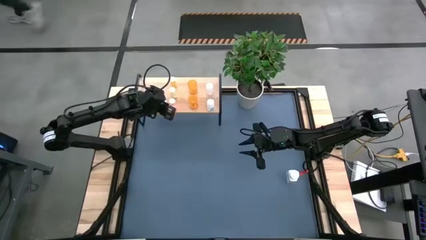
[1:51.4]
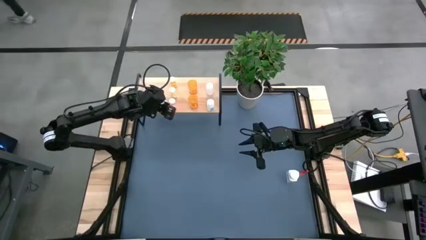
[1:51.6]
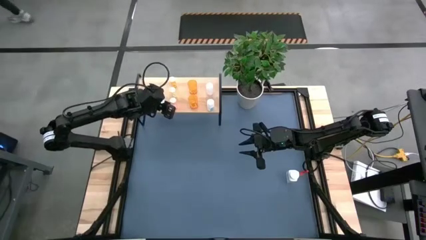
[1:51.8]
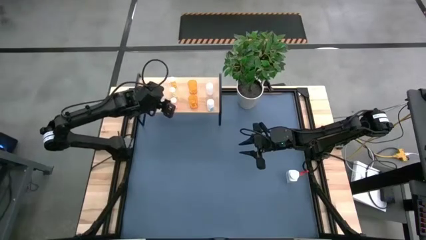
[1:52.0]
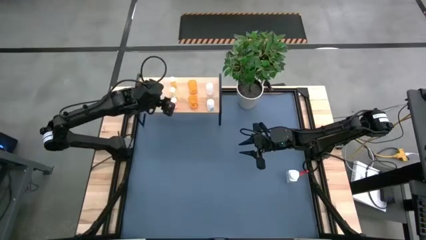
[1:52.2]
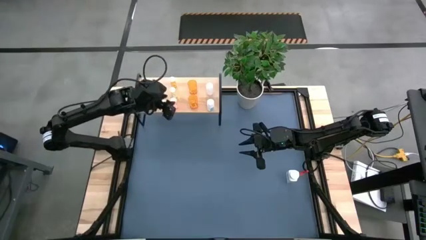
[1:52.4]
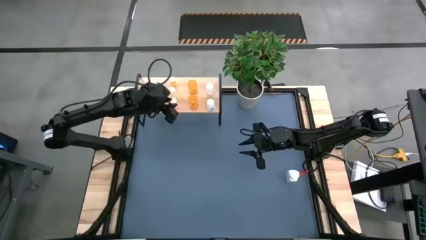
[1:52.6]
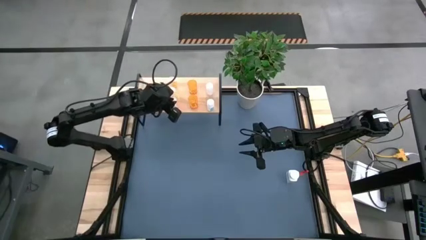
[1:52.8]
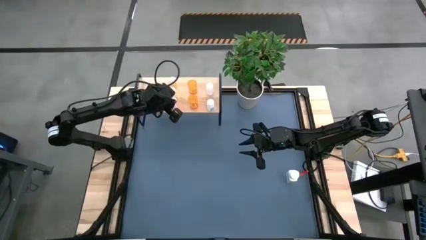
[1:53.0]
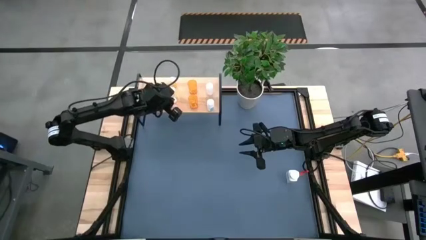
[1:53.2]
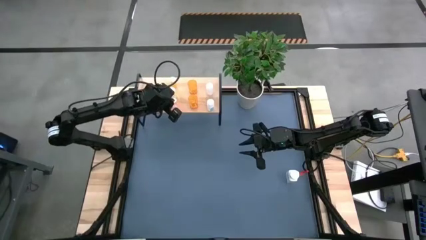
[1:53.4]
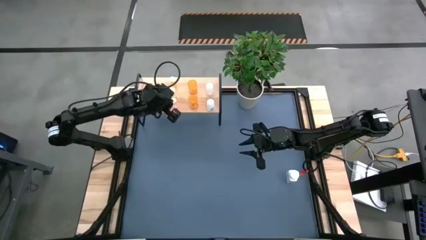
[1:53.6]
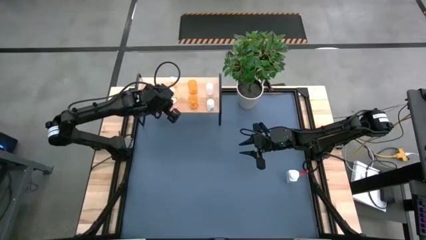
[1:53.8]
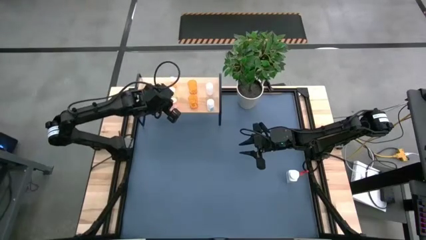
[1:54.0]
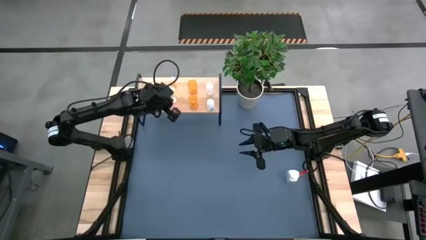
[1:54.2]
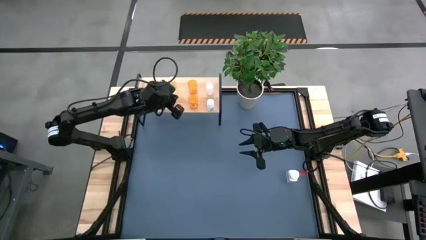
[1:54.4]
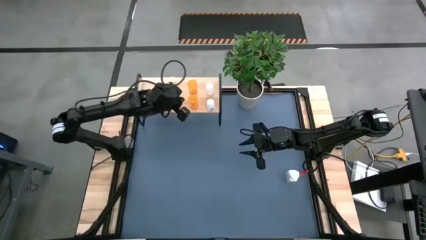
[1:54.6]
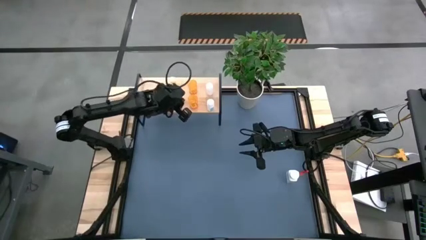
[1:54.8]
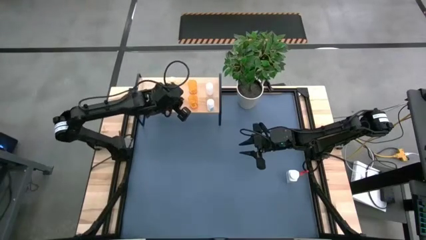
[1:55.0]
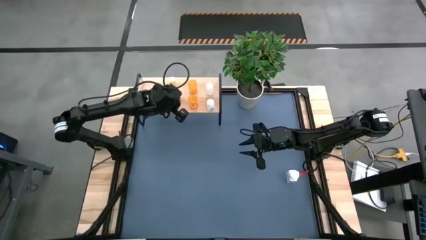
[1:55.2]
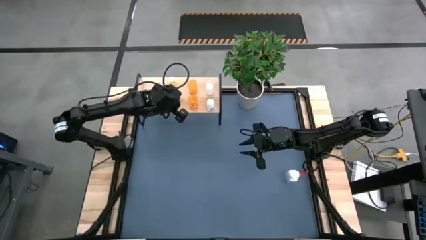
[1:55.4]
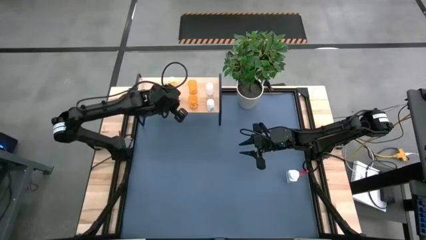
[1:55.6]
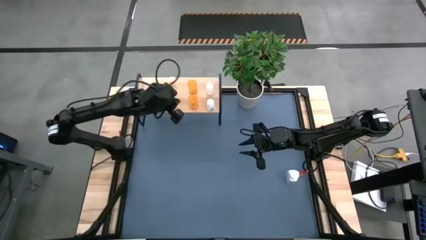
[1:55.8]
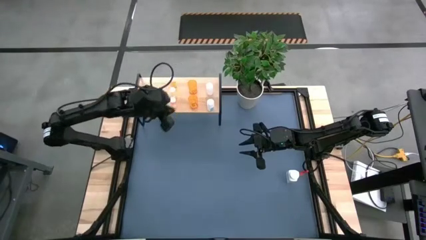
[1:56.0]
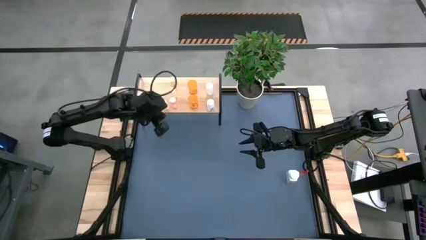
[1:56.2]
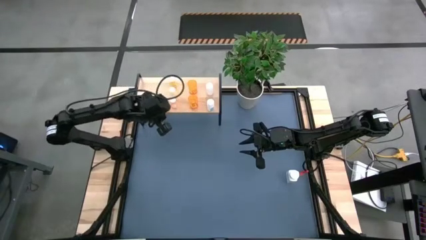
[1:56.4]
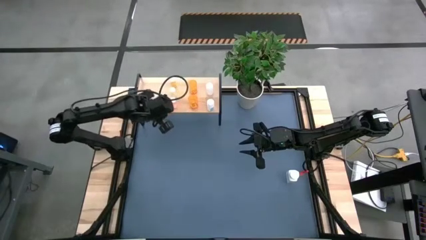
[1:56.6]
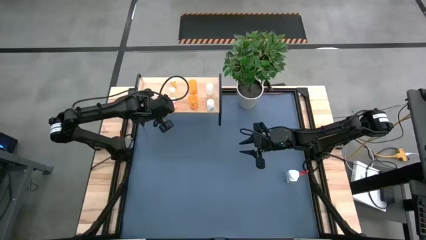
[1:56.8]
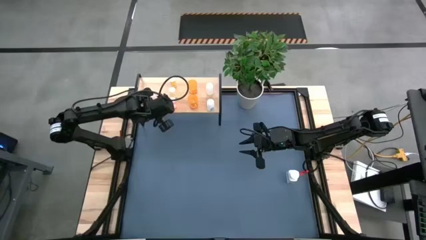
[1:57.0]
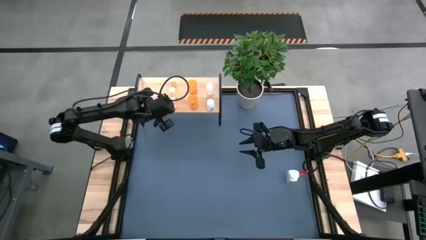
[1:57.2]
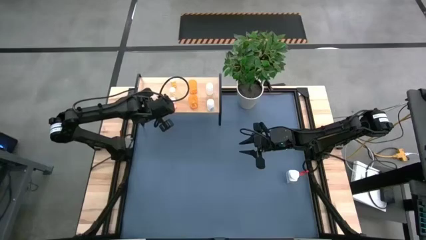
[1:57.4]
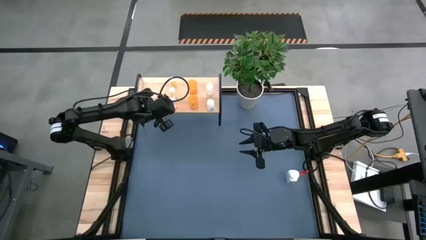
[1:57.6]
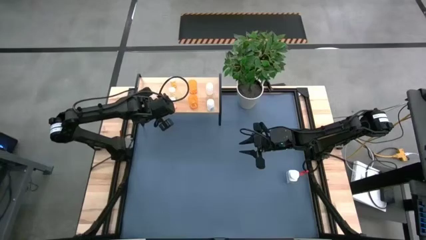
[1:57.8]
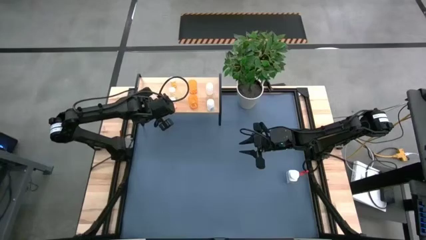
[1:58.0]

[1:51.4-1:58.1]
Task: Pick and place medicine bottles onto shelf by color
Adjust the pill bottles on the shelf

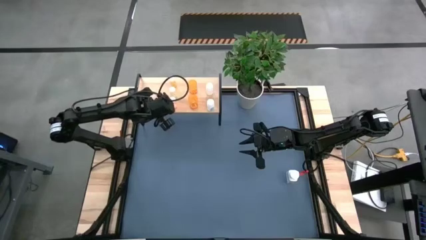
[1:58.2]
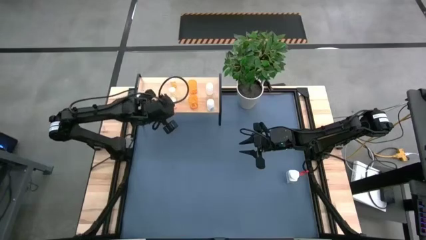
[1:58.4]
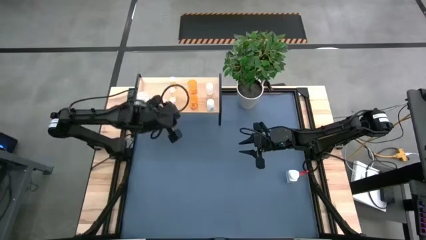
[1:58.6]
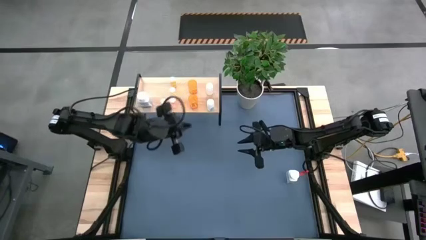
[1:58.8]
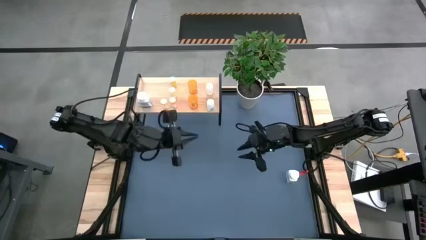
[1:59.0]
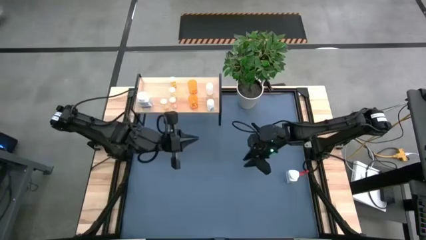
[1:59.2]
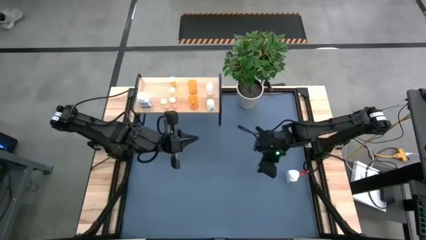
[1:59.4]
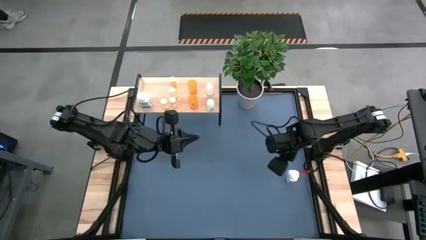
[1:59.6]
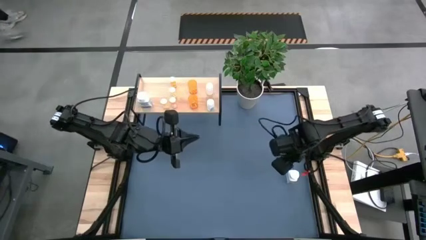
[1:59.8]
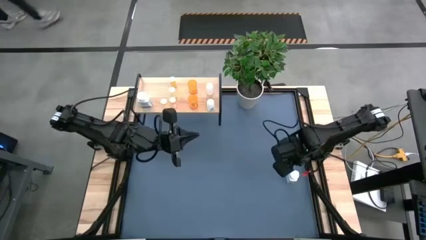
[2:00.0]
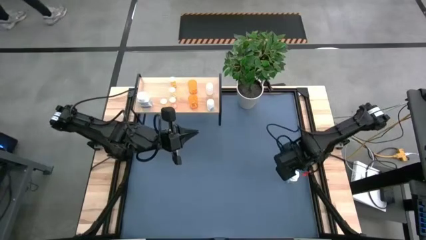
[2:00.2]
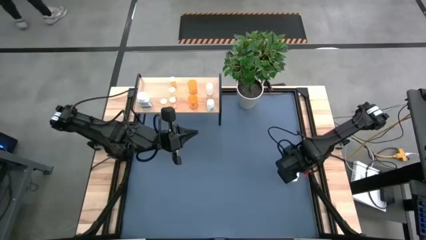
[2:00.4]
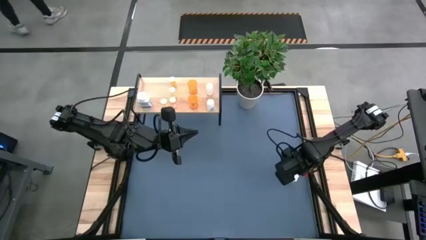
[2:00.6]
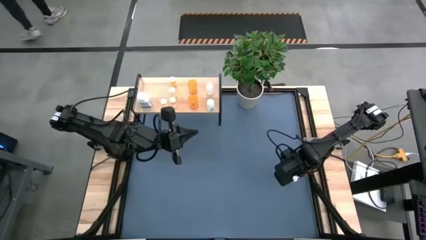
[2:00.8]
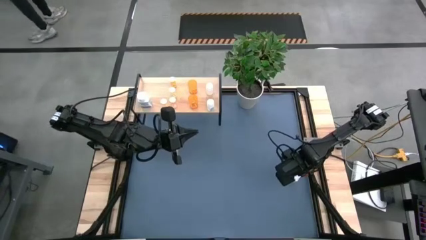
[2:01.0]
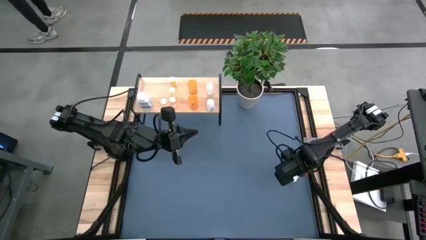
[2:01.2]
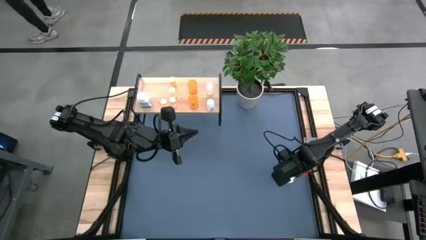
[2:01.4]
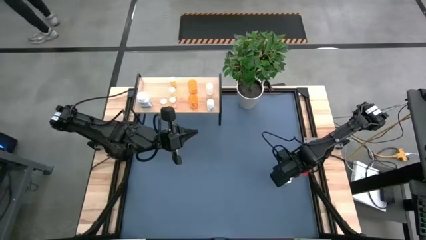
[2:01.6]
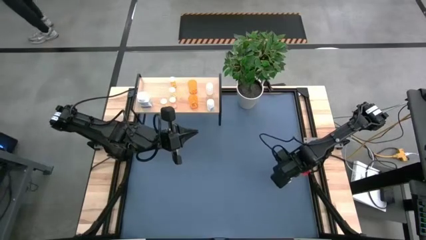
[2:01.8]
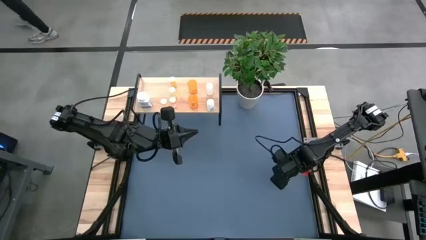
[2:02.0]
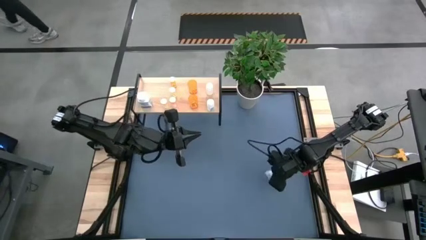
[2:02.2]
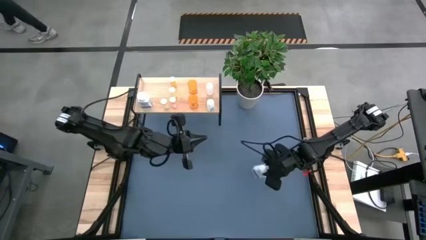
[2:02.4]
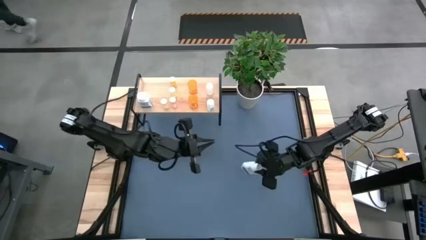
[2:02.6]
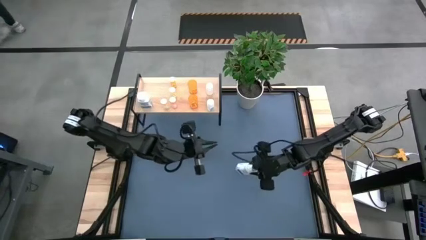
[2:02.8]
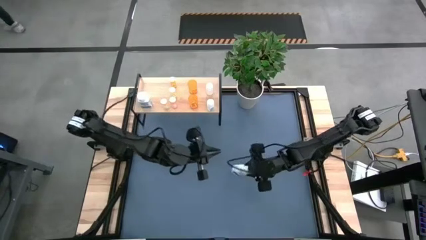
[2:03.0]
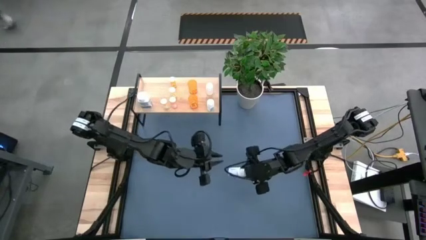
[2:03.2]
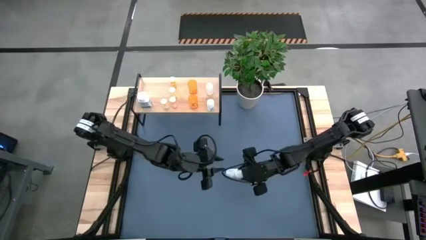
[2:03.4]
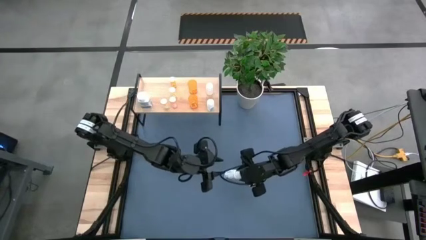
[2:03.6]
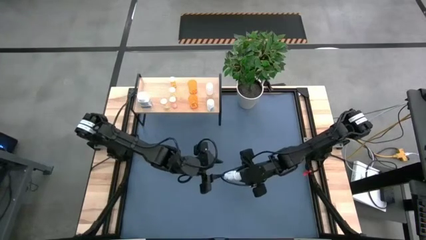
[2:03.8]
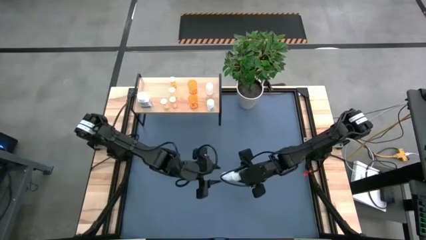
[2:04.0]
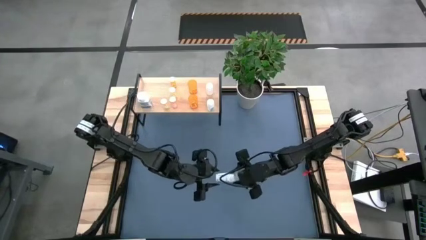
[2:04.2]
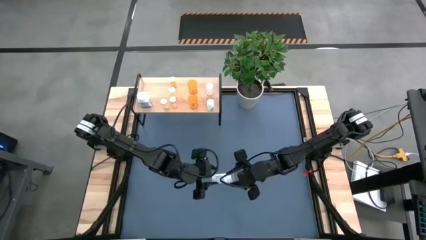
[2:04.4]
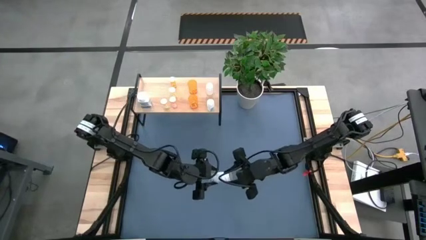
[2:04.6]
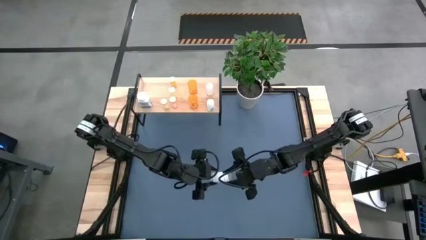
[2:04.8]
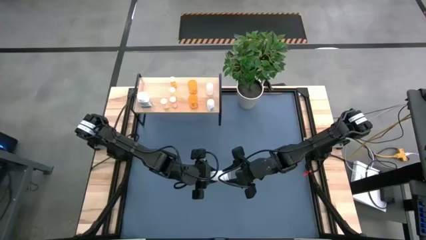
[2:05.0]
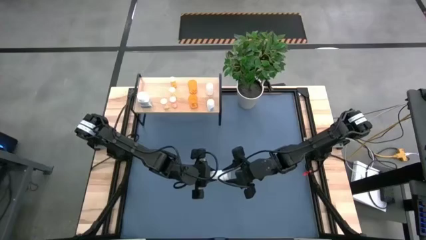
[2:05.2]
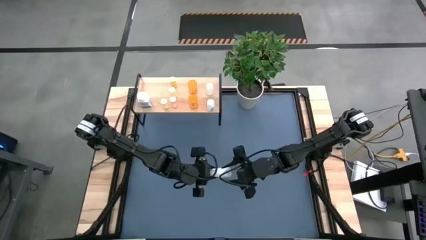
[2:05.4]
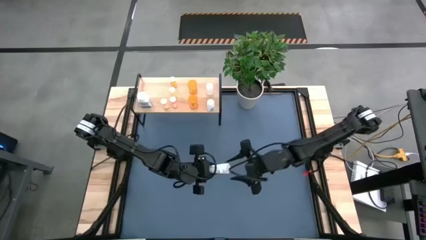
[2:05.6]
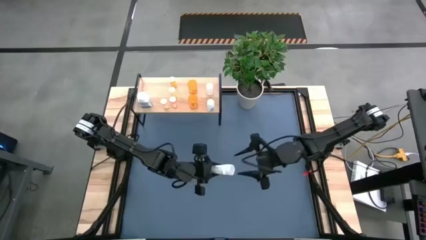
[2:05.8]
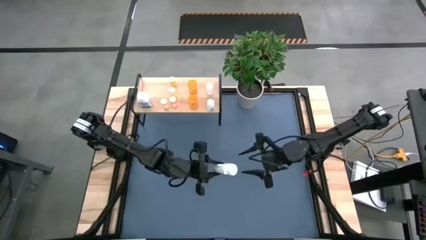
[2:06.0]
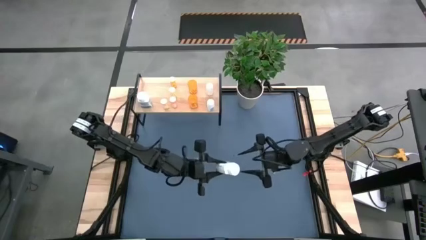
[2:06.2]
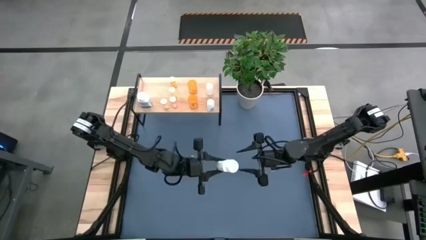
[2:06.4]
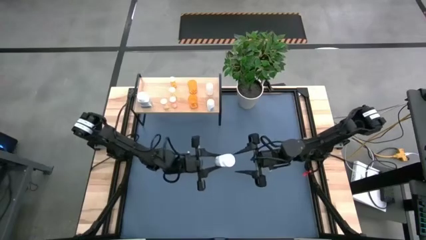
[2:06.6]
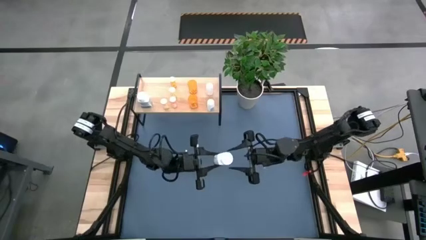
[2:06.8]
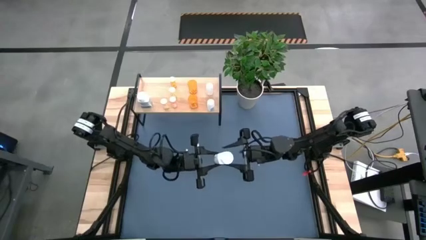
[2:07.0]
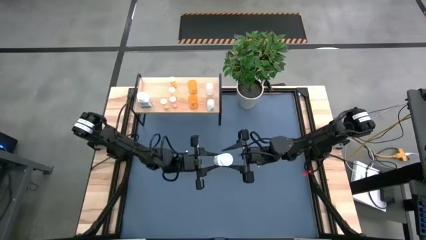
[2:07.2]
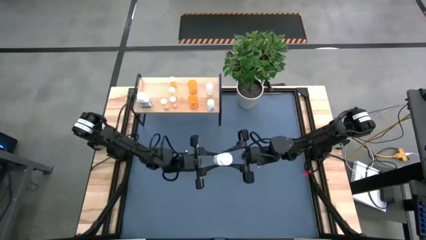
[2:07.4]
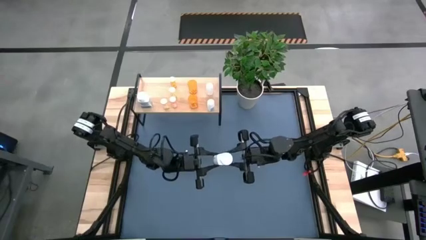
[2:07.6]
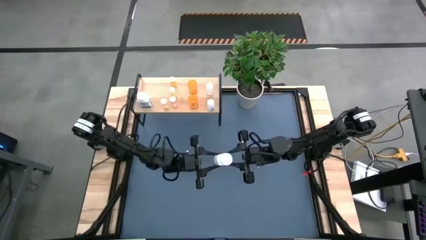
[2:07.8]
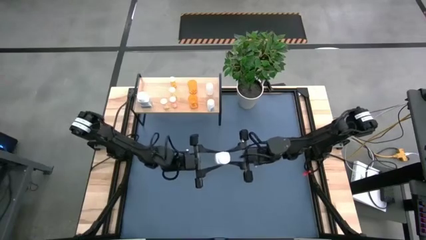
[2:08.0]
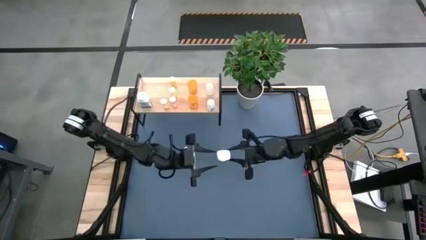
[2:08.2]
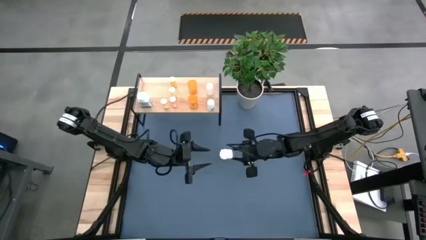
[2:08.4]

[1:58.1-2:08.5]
Put the white pill bottle on the shelf
